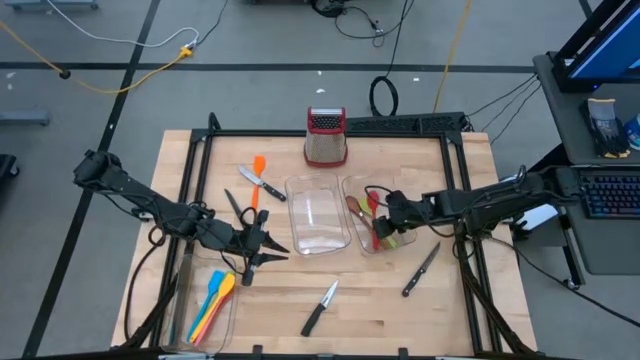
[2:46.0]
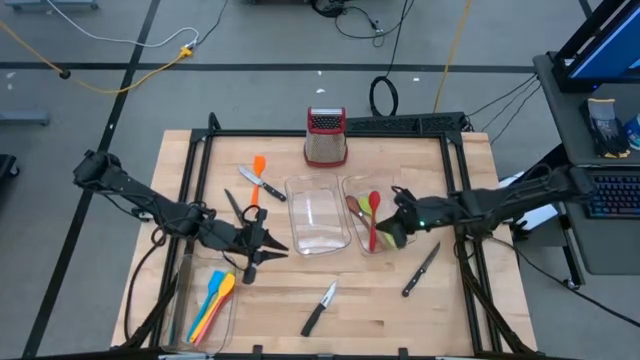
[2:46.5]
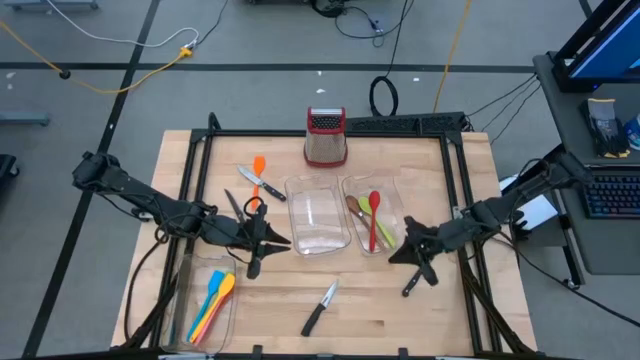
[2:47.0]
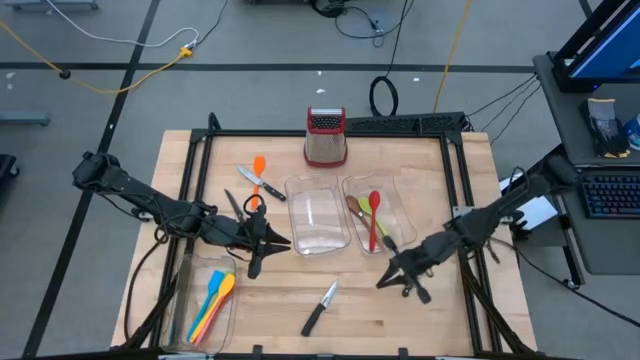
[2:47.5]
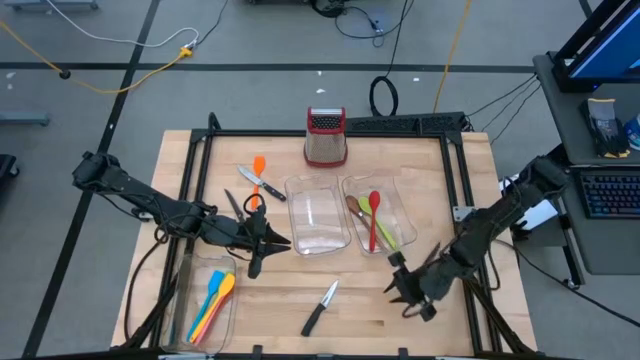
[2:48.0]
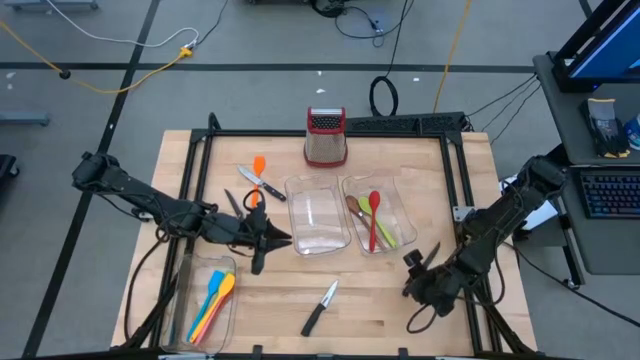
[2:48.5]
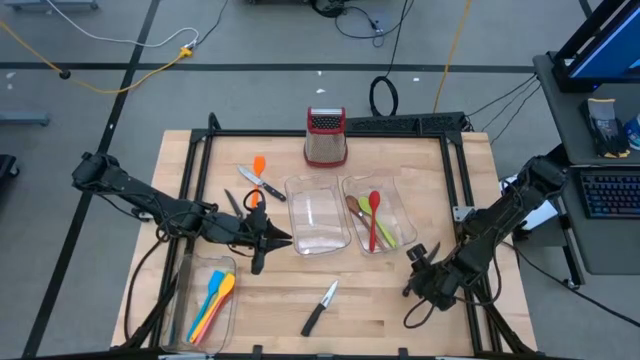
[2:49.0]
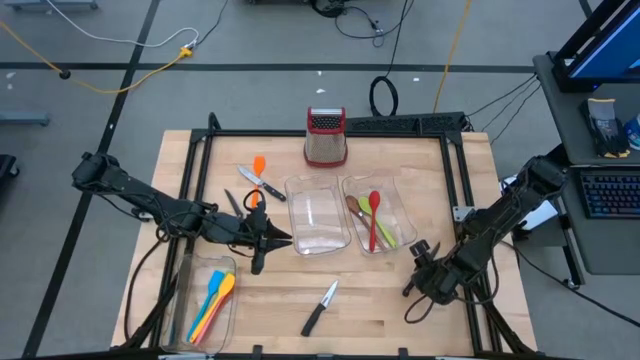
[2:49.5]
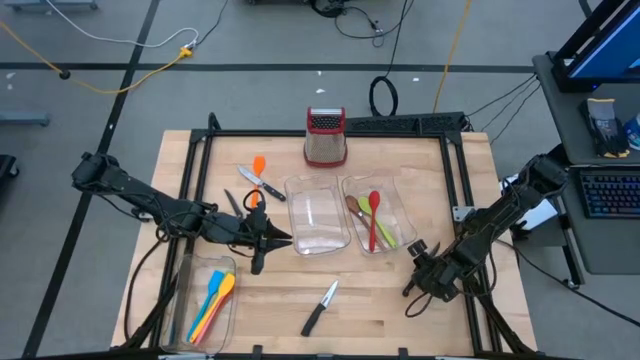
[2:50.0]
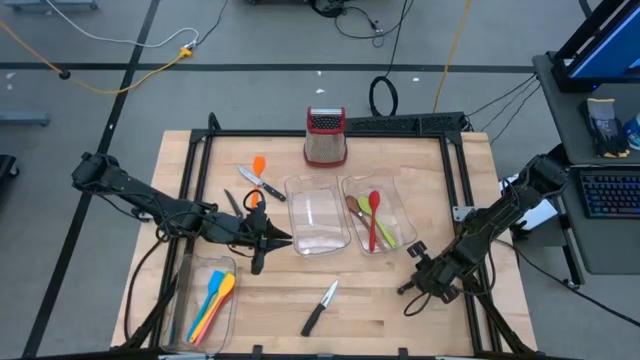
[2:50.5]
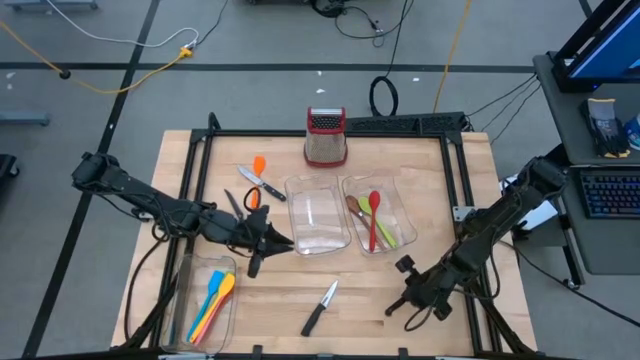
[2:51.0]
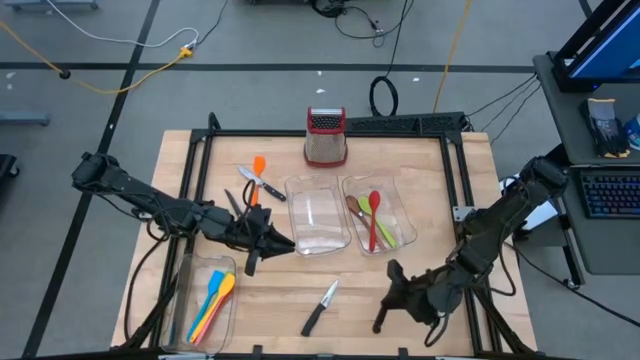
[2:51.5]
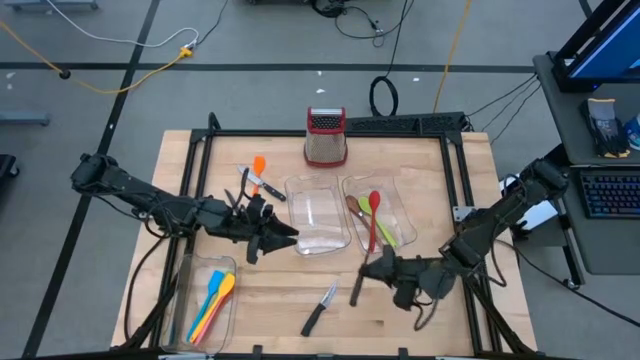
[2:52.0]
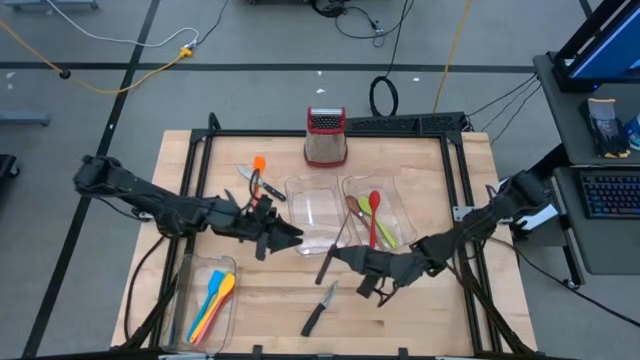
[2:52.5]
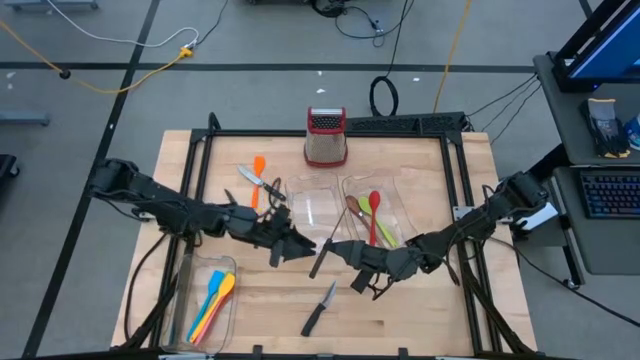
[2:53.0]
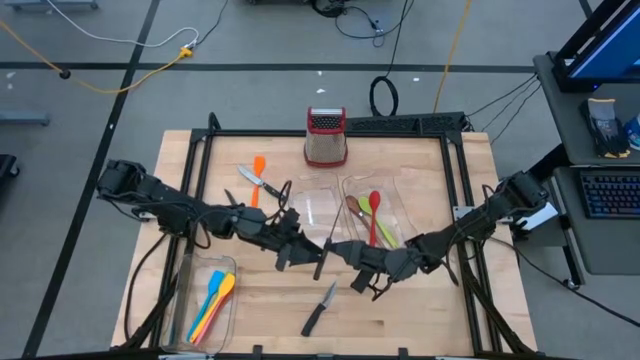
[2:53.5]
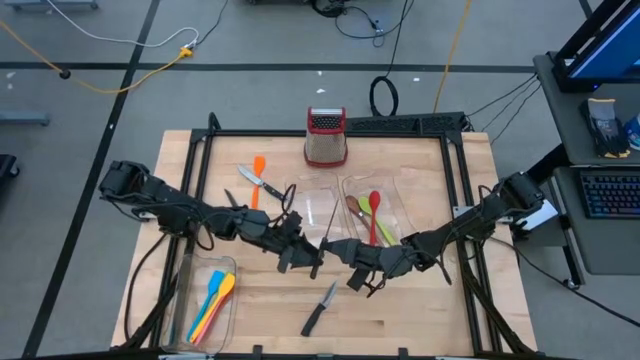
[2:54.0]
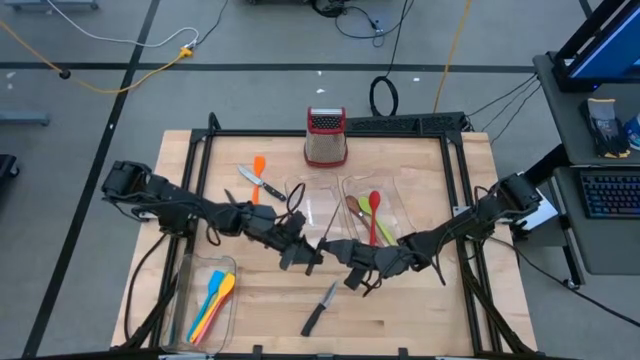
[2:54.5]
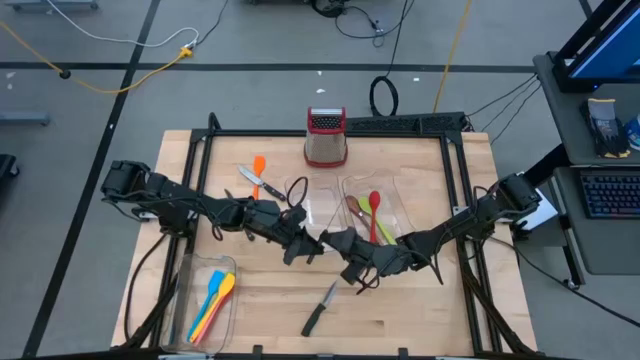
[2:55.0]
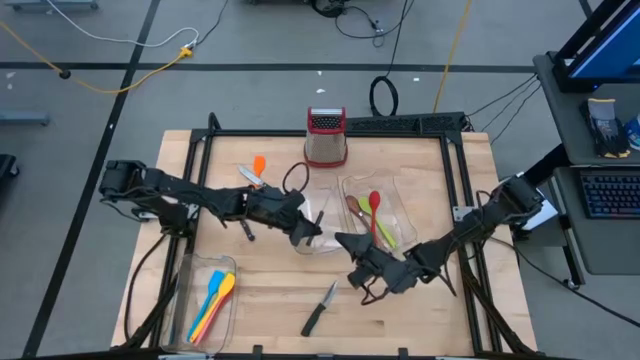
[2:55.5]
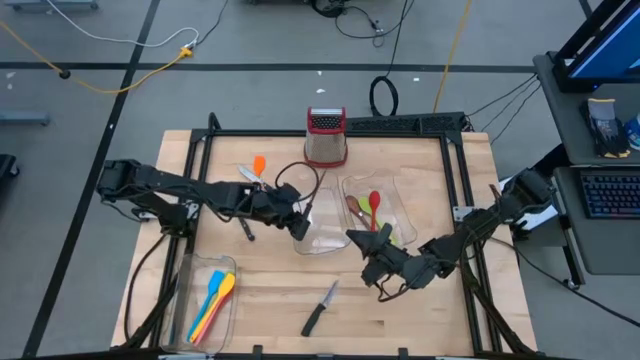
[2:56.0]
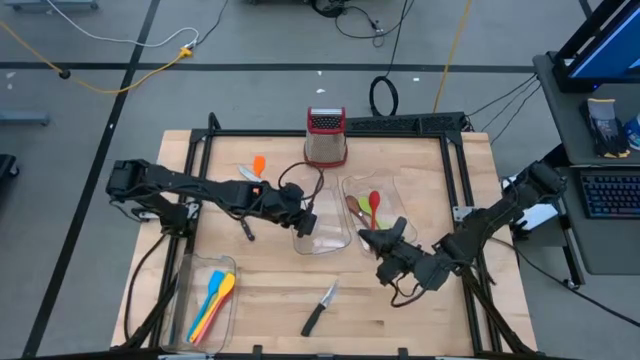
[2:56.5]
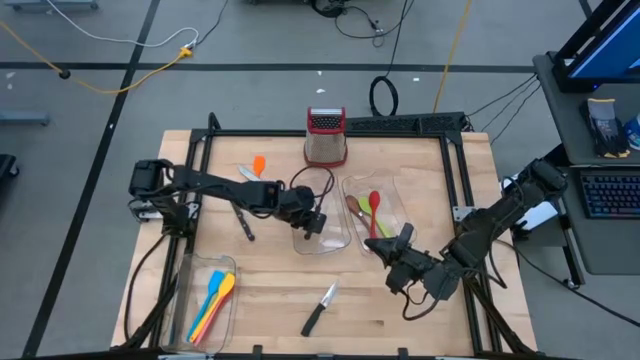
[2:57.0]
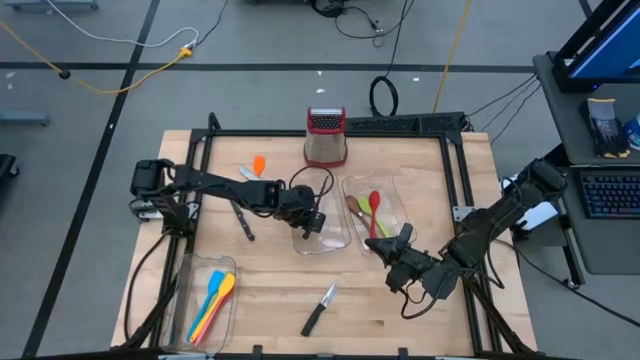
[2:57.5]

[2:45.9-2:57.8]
Task: Pick & Place Kitchen Items
Put the black knife into the middle transparent bin

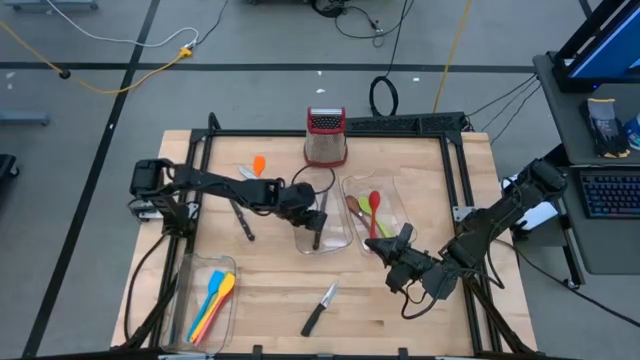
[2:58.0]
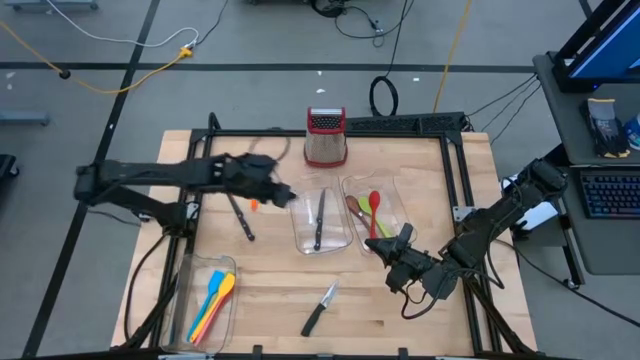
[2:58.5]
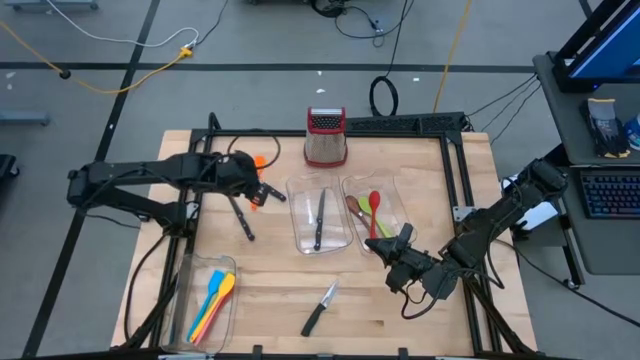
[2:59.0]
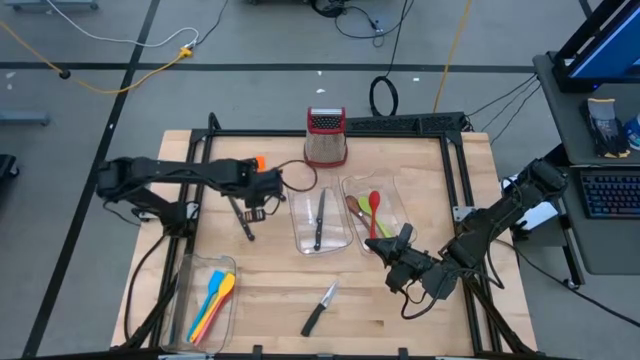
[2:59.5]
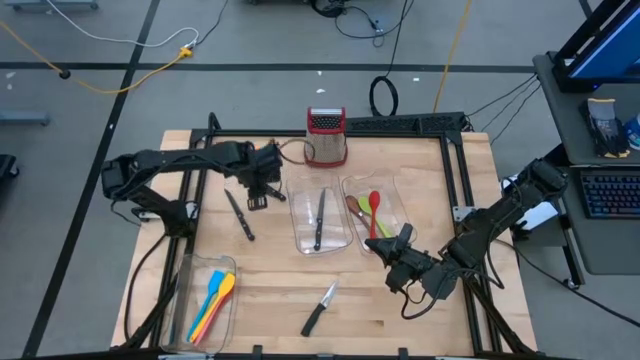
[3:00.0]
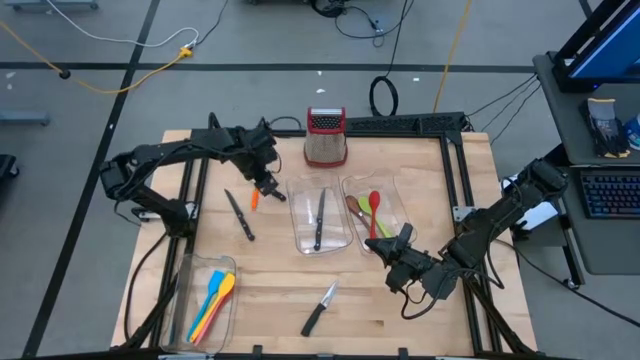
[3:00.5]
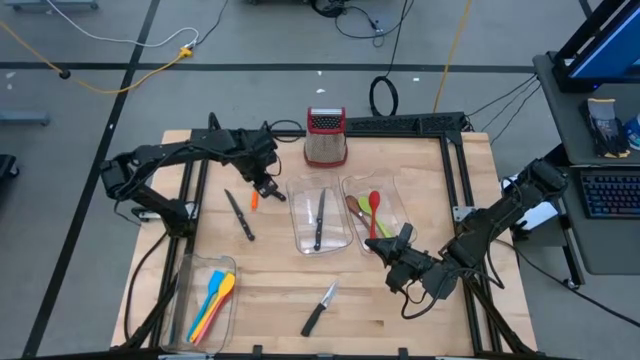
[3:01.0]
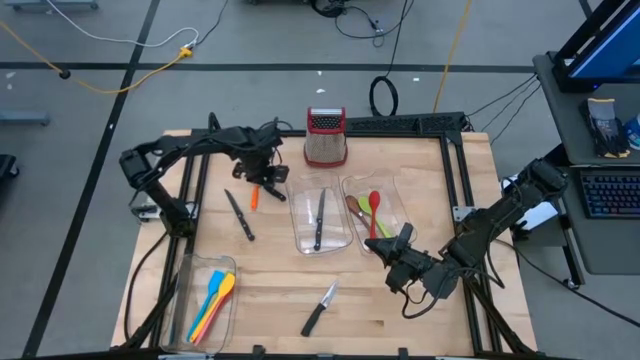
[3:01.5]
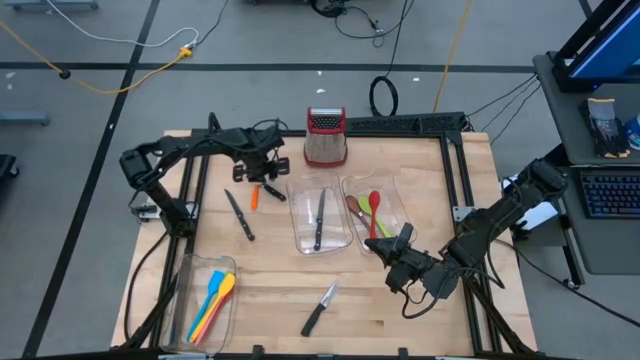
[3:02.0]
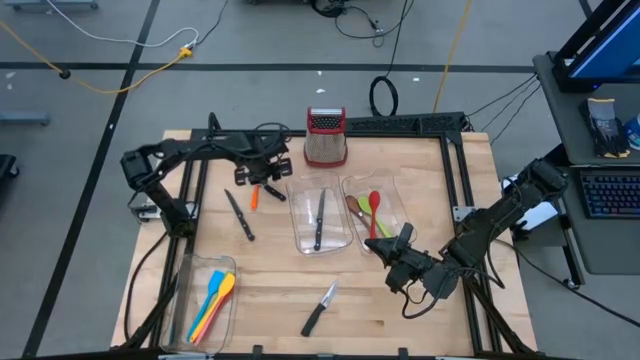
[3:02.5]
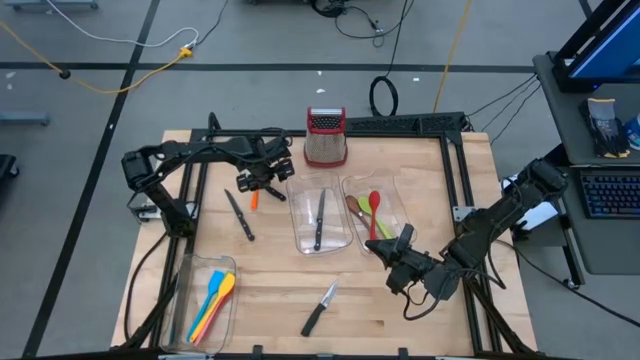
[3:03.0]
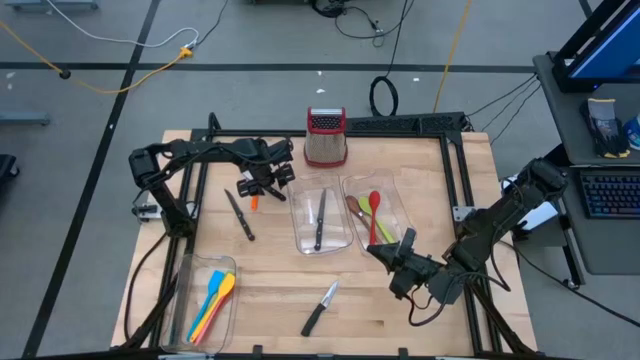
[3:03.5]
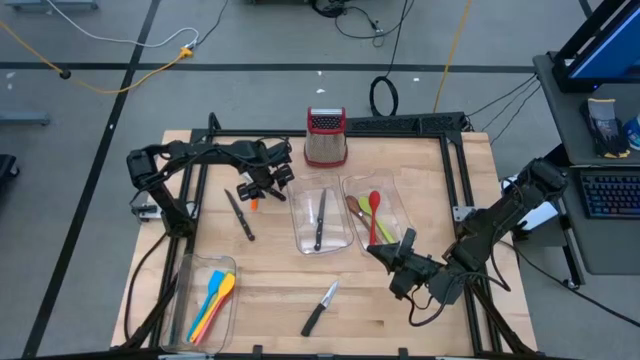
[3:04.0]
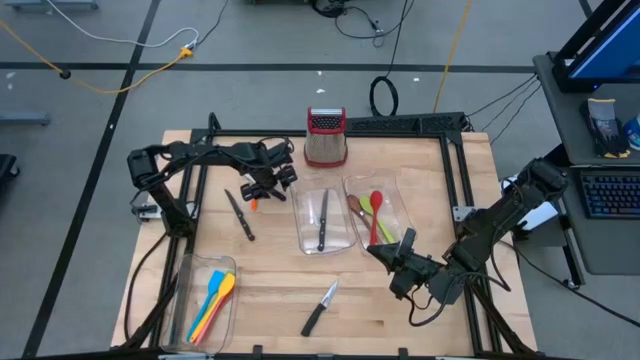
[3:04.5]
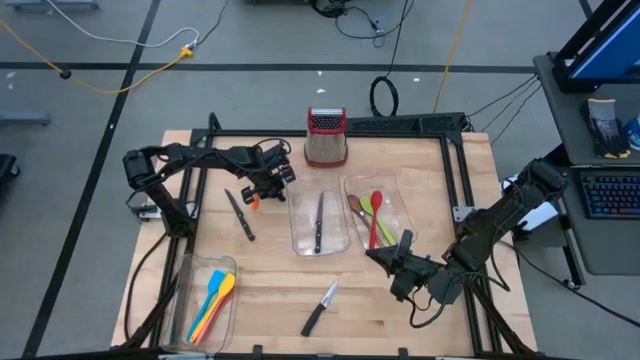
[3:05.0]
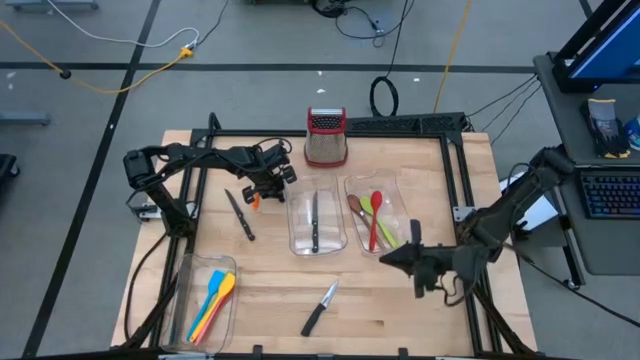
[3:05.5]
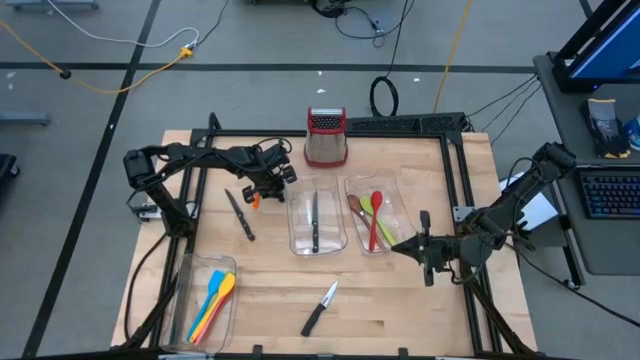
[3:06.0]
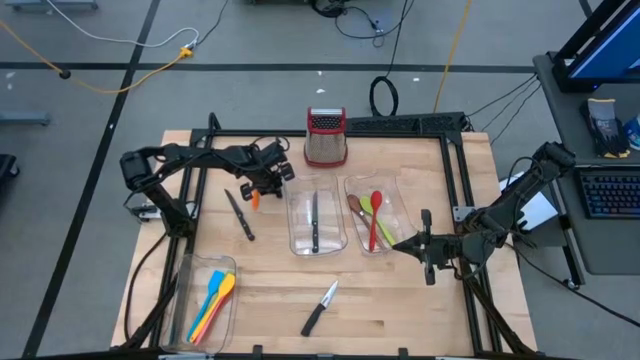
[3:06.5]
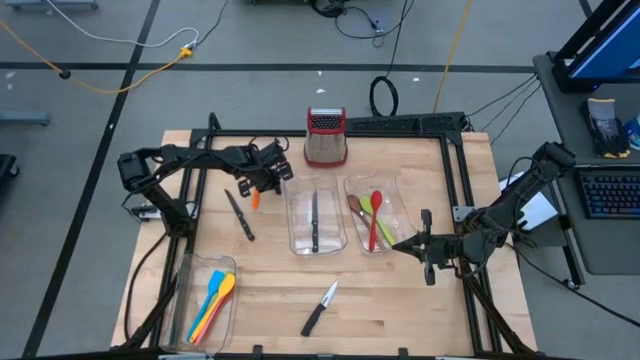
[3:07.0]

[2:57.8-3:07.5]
Put the black knife into the middle transparent bin
